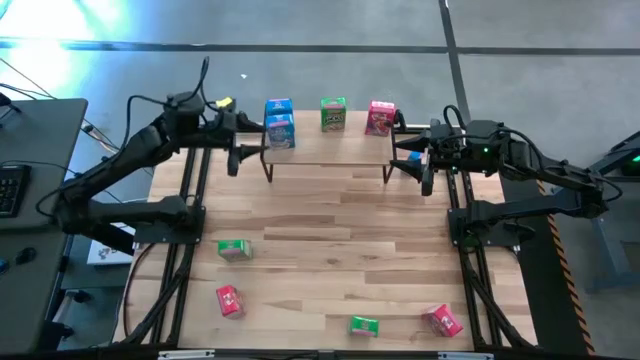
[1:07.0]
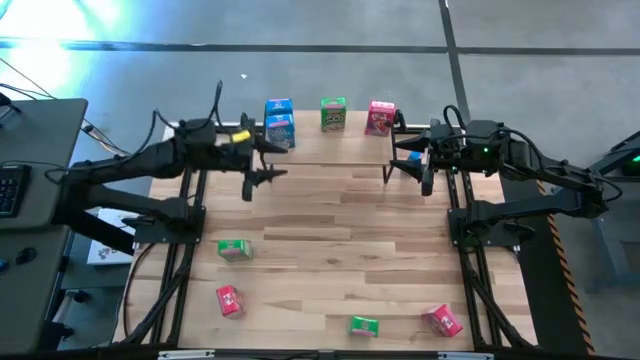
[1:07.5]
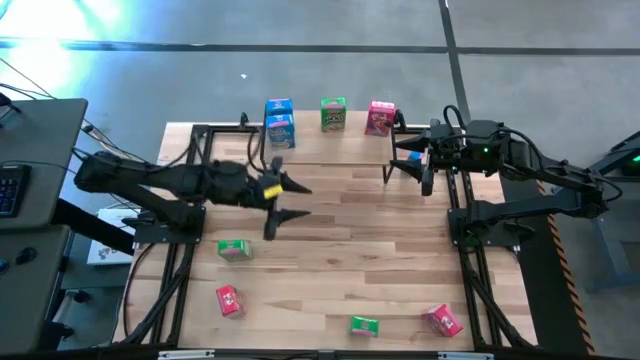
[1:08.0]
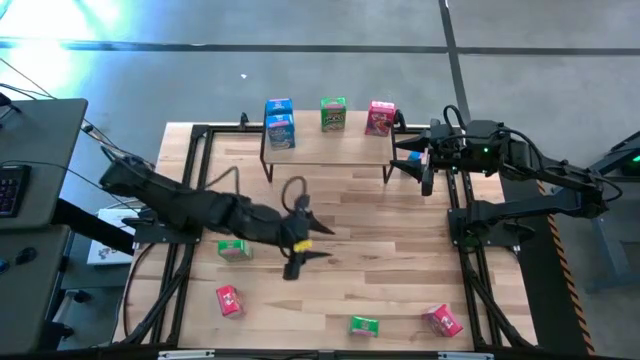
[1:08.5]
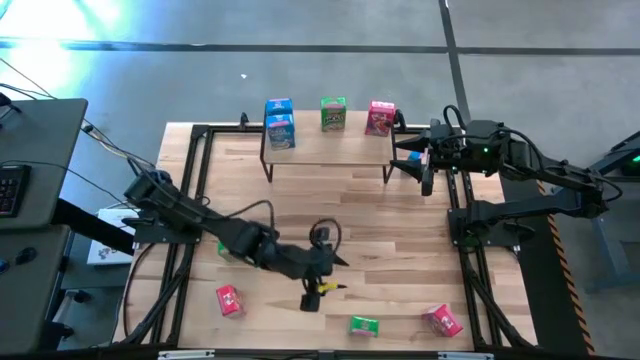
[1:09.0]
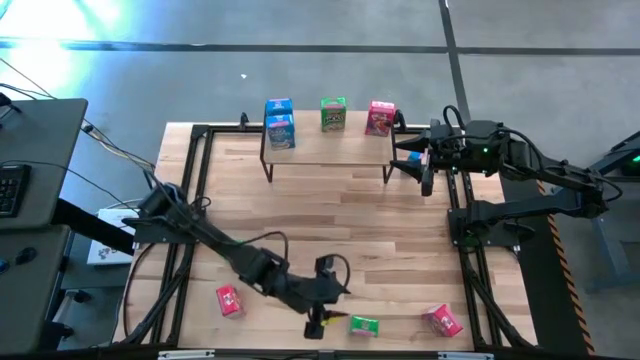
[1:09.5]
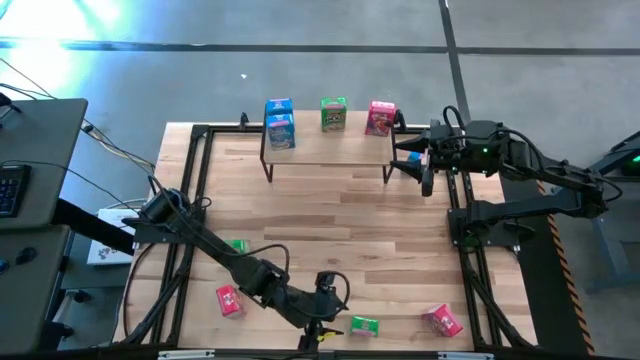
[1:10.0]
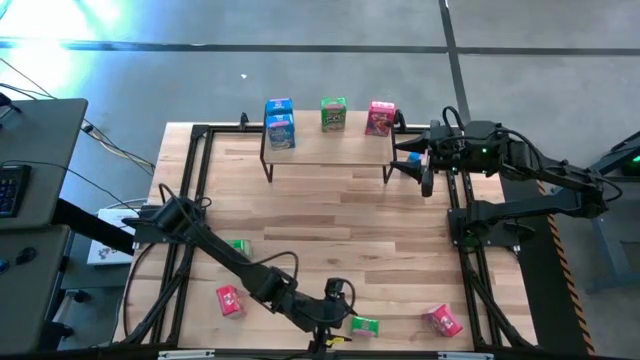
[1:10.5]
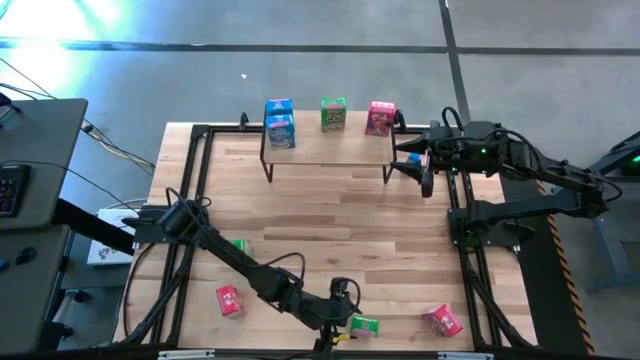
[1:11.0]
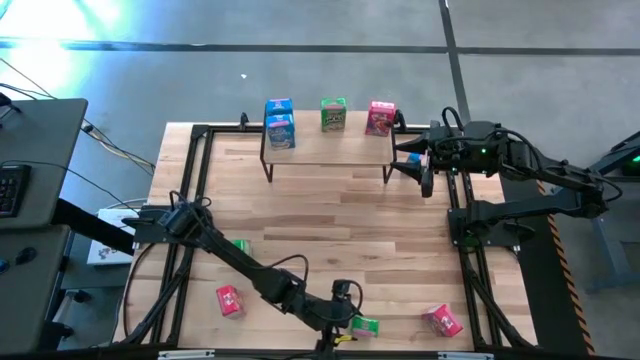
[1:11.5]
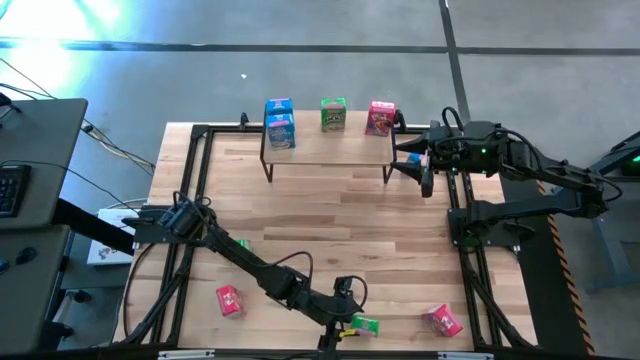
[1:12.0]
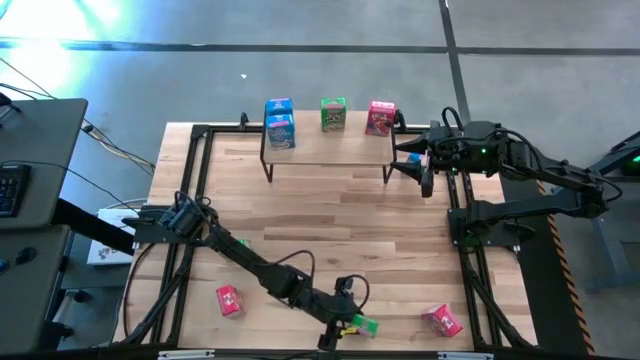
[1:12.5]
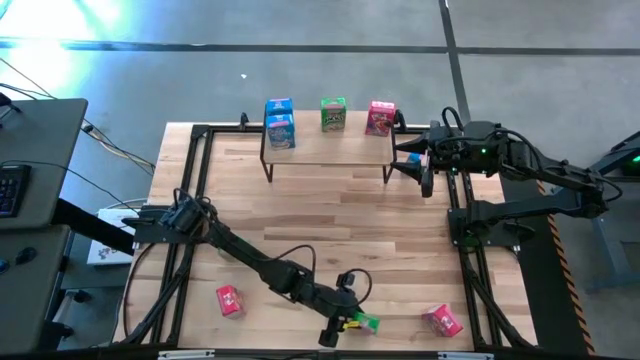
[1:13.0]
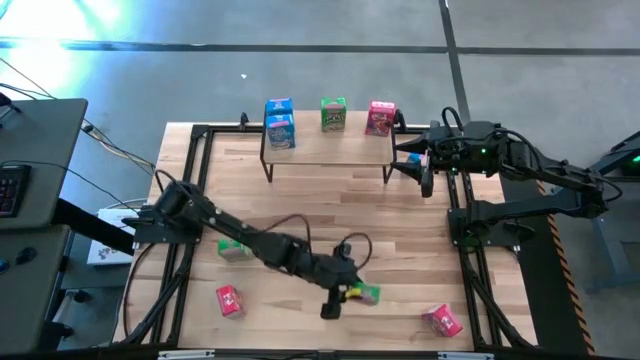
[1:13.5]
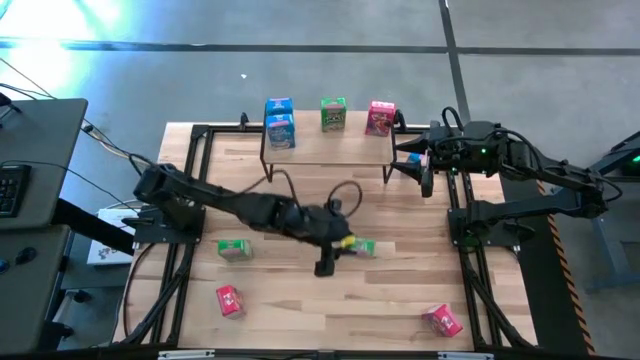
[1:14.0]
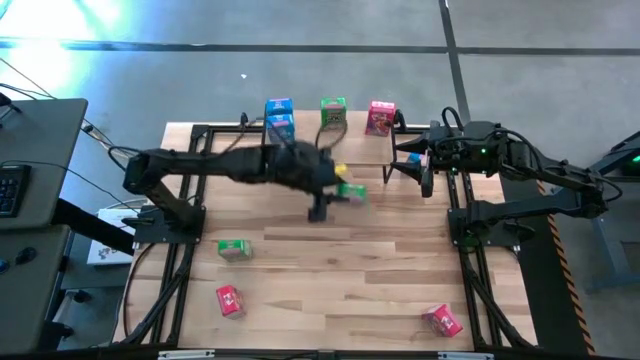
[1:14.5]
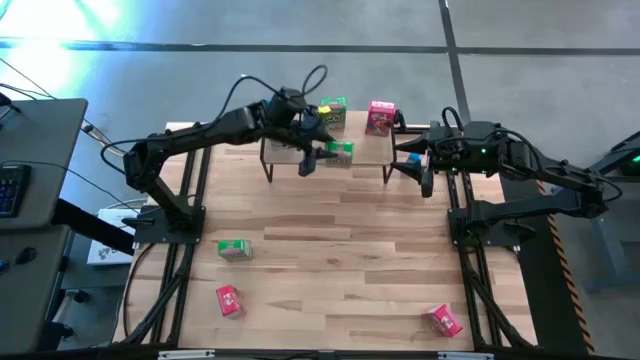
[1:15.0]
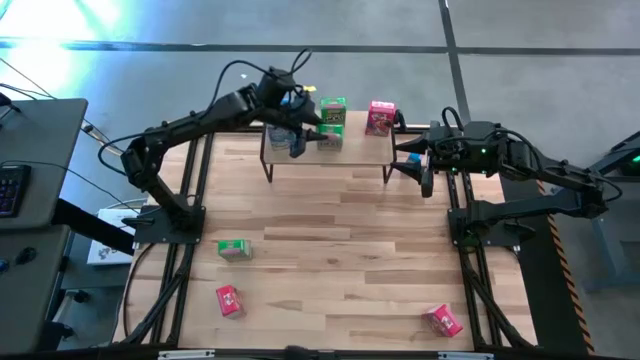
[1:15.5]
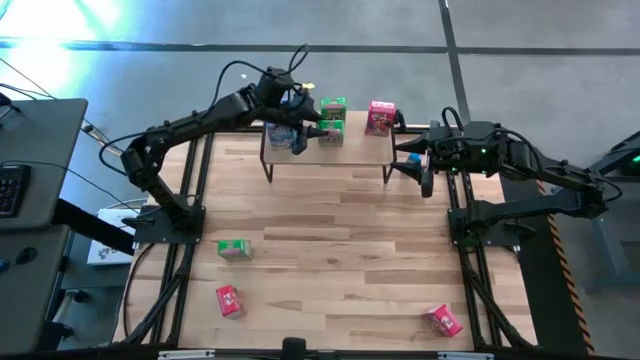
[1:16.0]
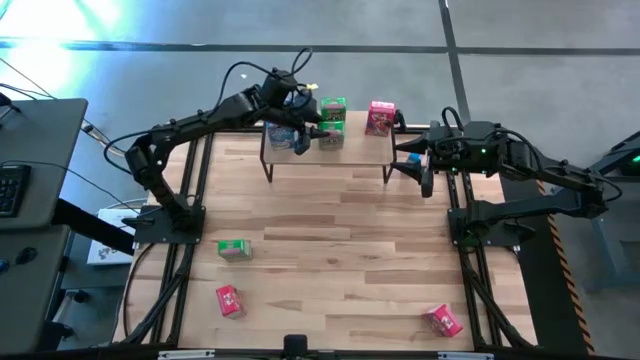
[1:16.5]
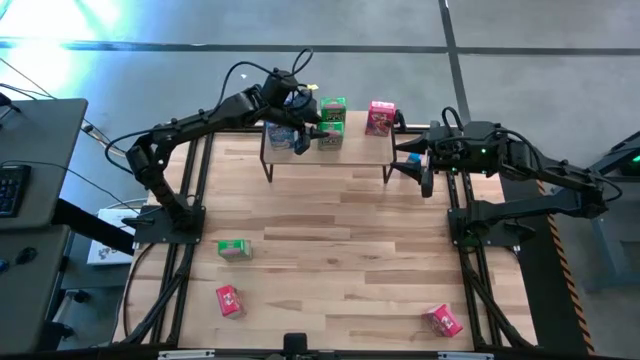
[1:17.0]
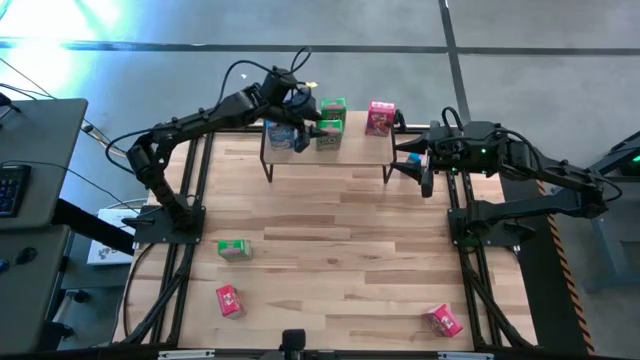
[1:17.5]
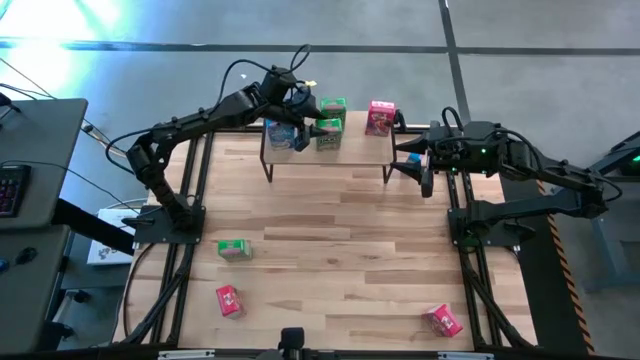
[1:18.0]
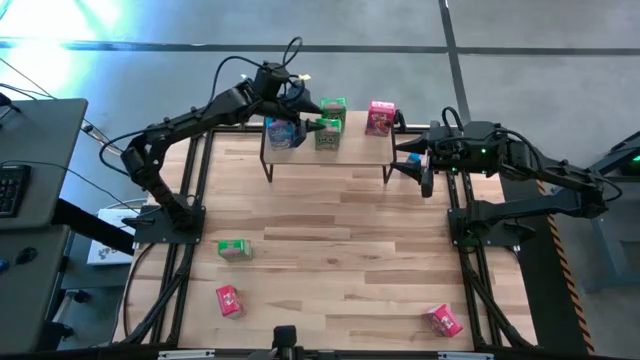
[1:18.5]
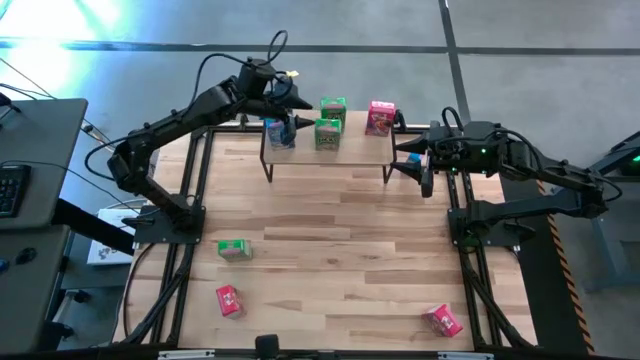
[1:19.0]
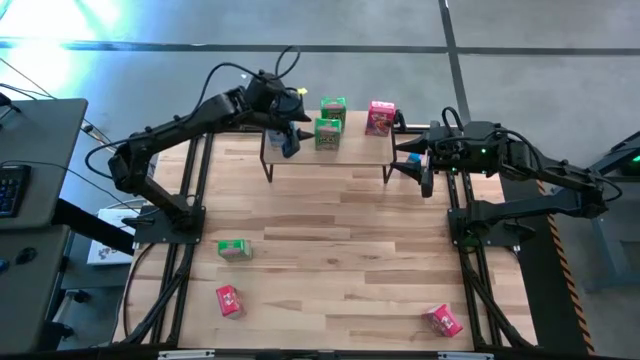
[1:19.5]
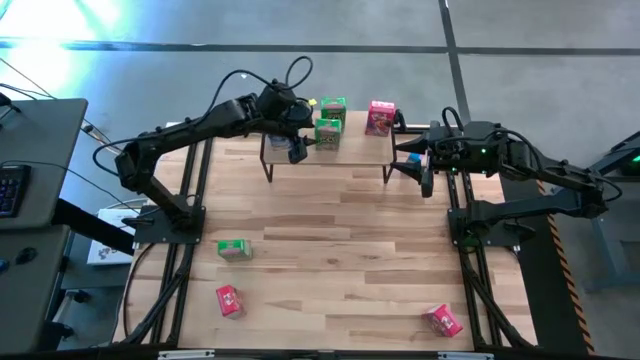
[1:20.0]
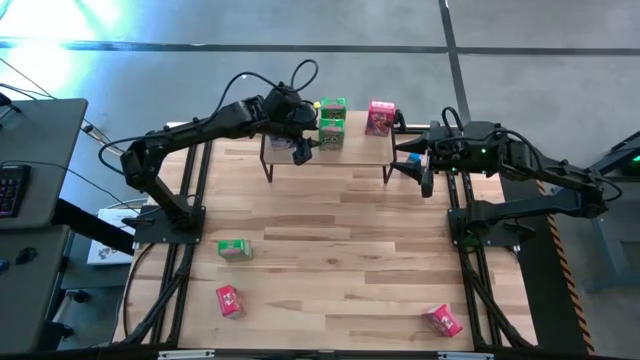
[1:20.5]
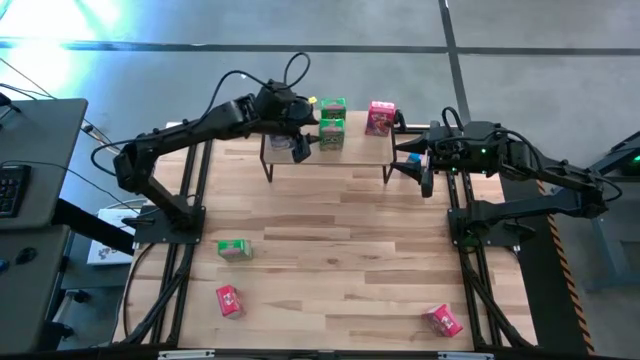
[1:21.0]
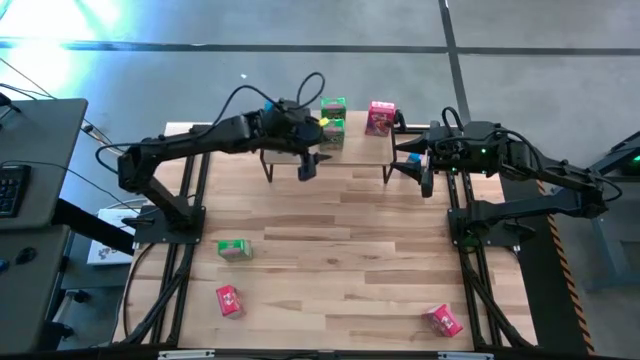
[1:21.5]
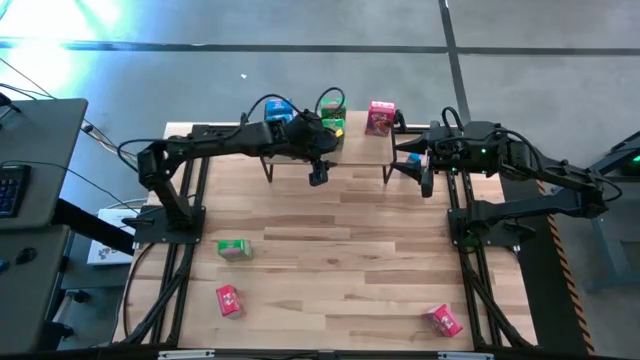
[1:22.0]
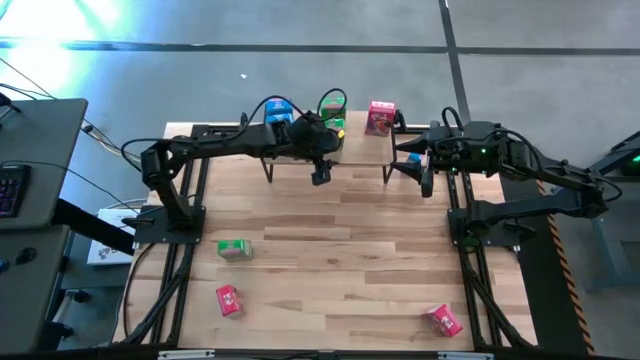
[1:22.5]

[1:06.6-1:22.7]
Task: Stack cereal on shelf
Put the bottom green cereal box on the shelf aligned with the other green cereal box

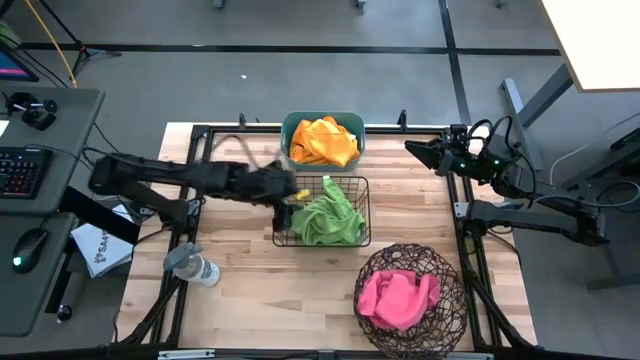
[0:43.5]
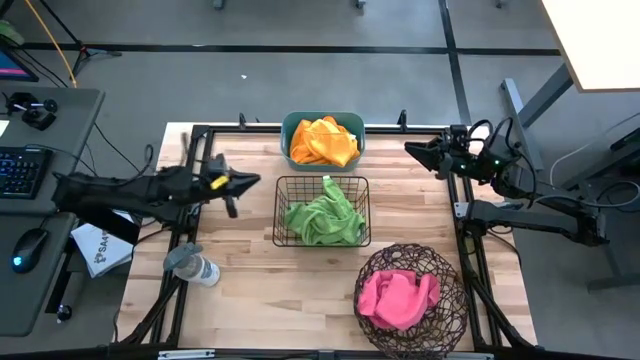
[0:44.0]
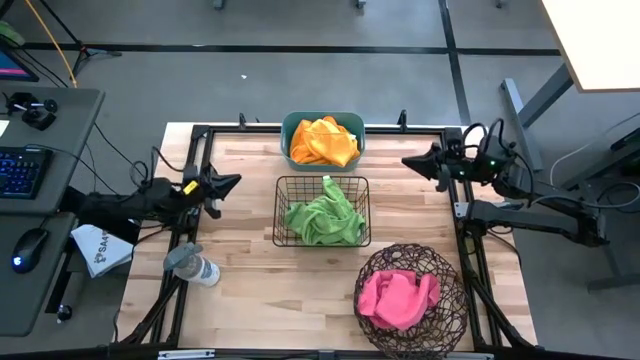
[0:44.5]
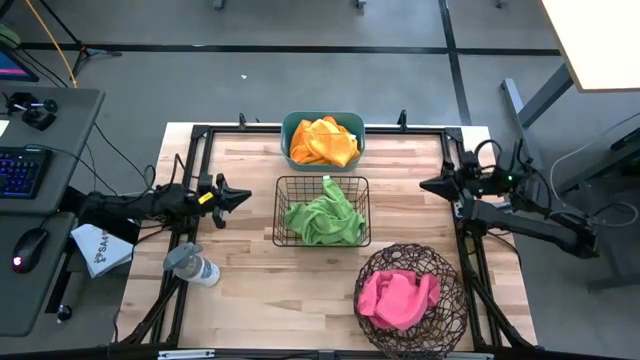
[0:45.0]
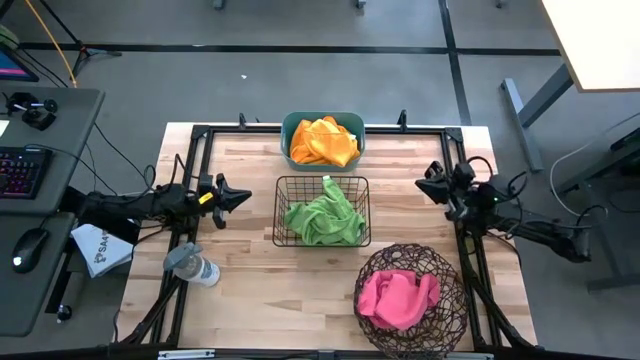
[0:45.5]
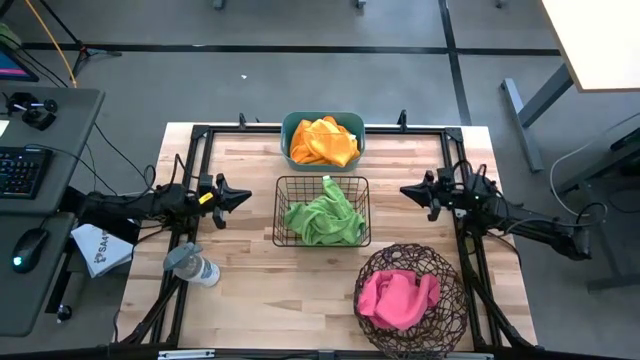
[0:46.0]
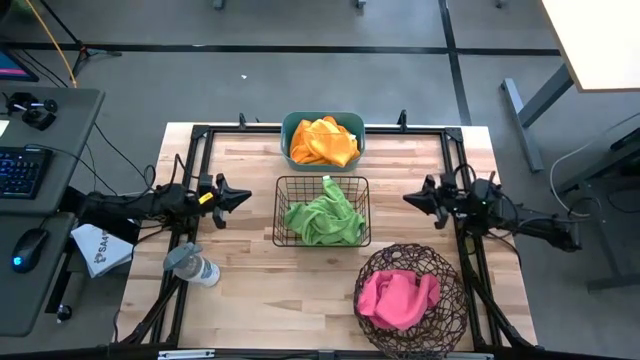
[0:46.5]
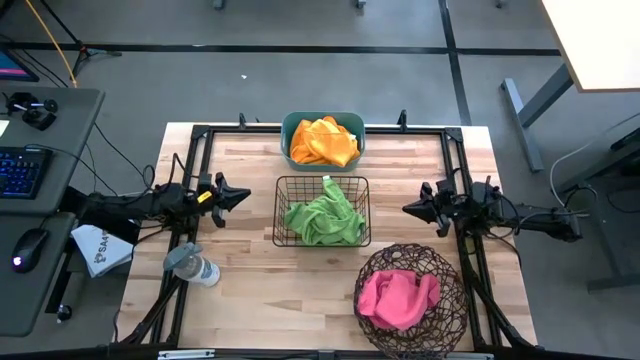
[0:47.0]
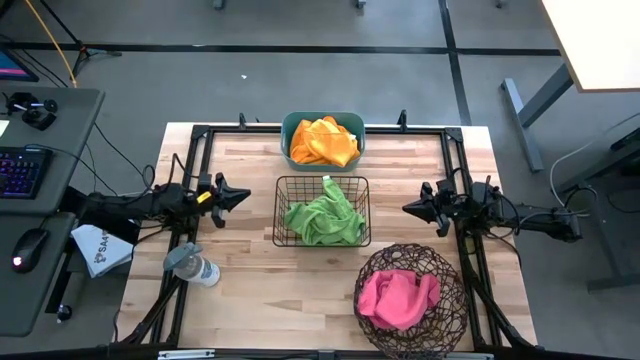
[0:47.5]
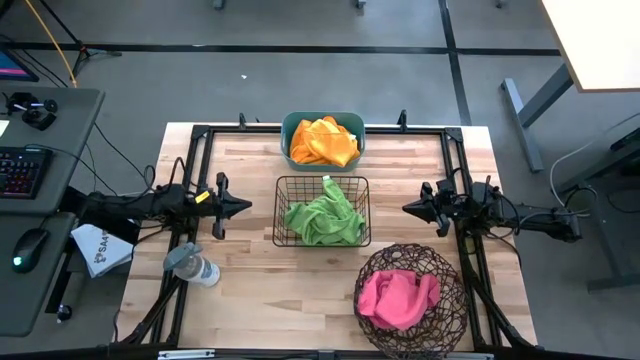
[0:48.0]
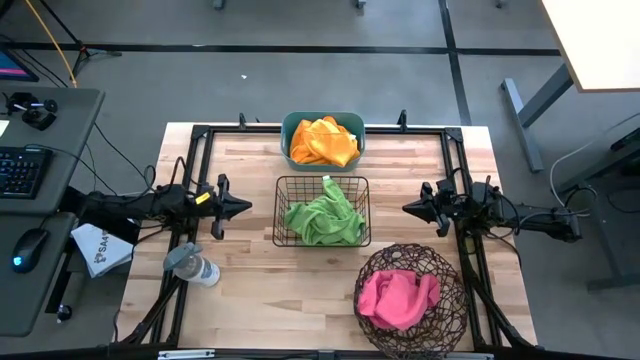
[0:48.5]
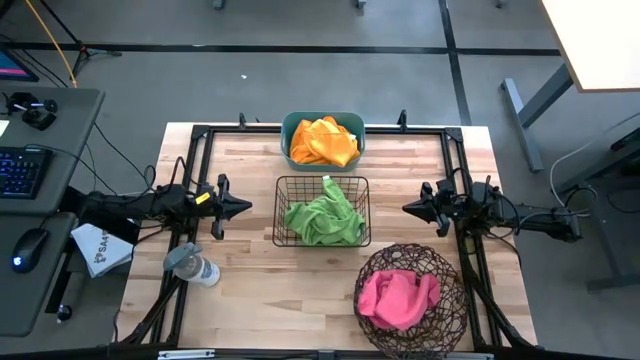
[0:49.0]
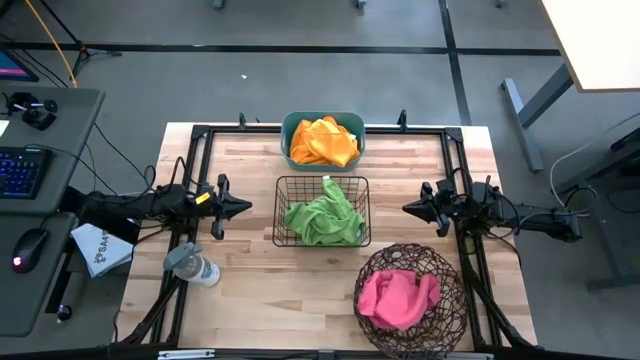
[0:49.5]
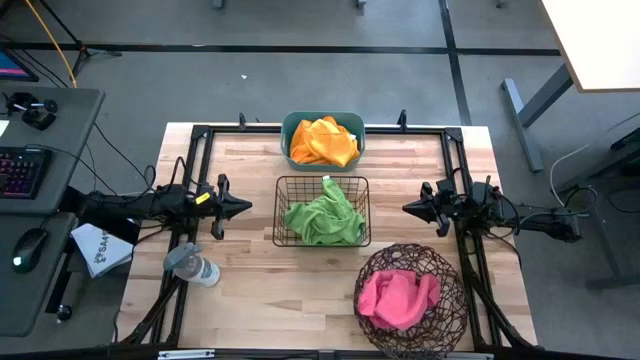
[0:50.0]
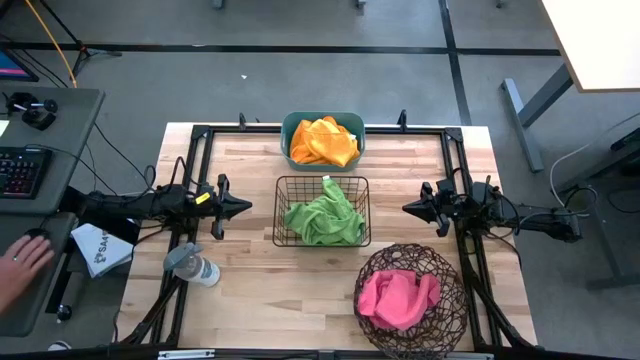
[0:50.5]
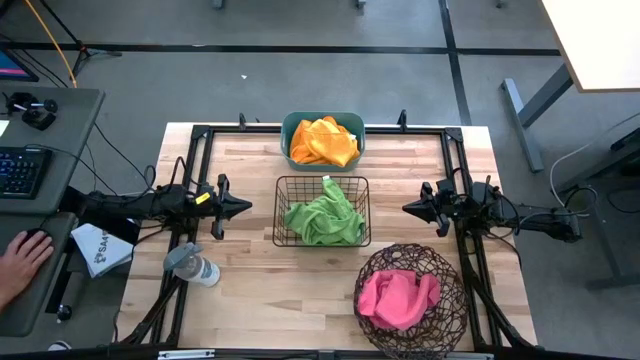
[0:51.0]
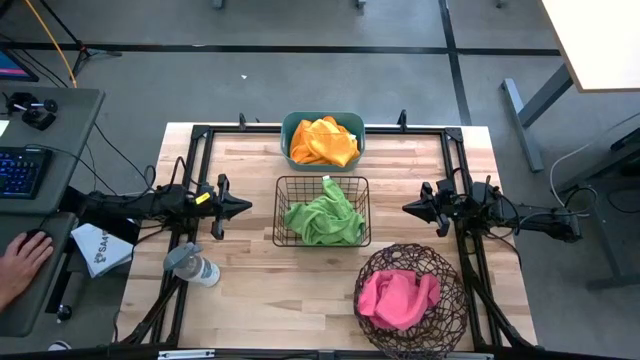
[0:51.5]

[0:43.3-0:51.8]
Task: Sort microfiber towel by color & place in baskets
Return to Home Position
